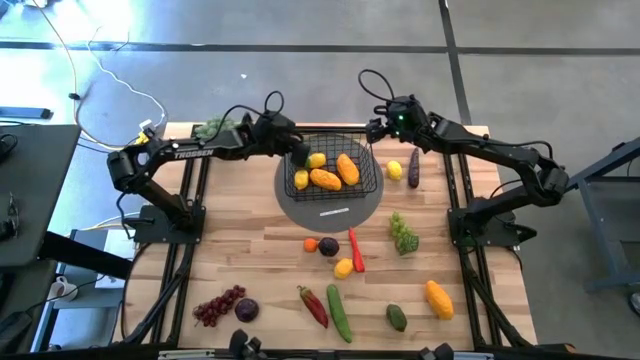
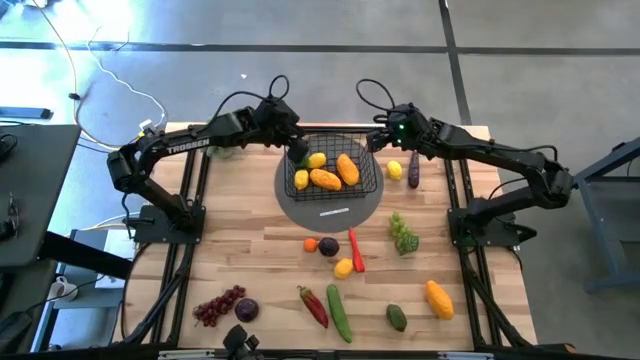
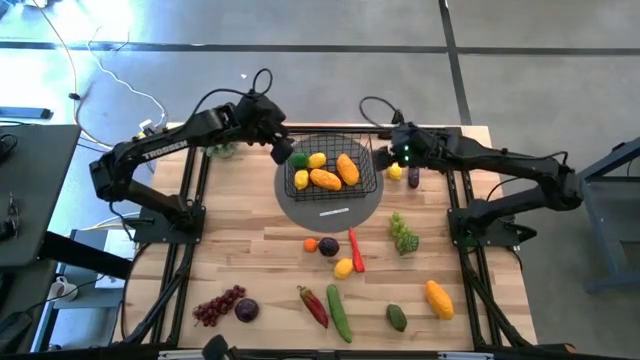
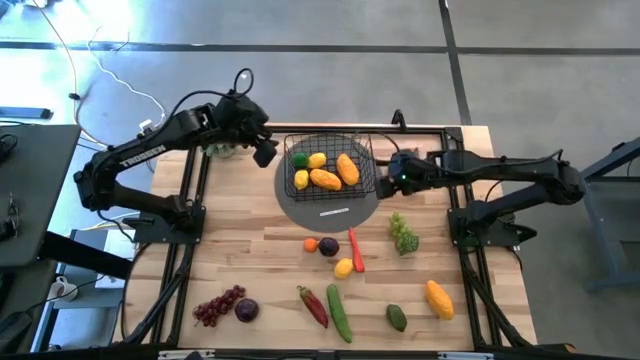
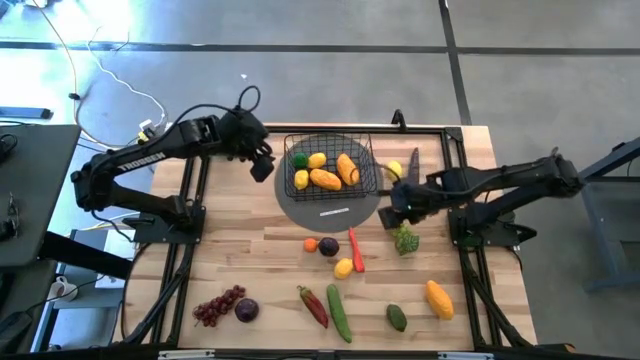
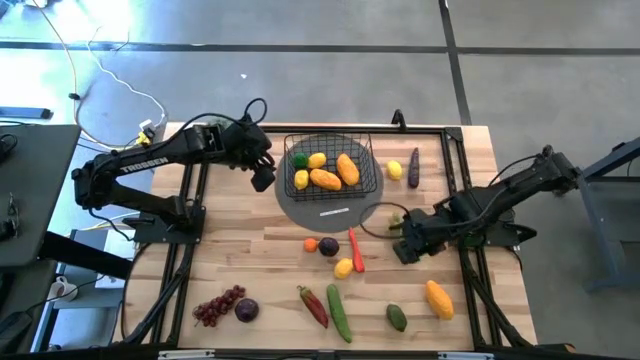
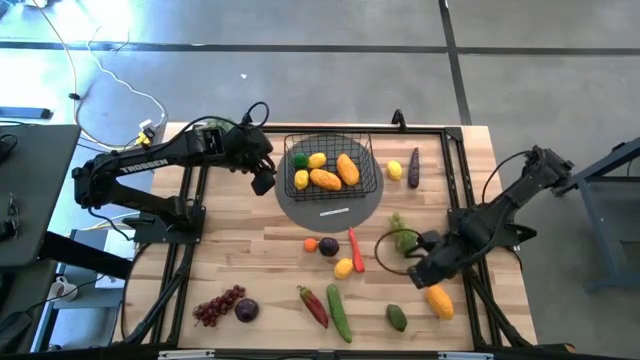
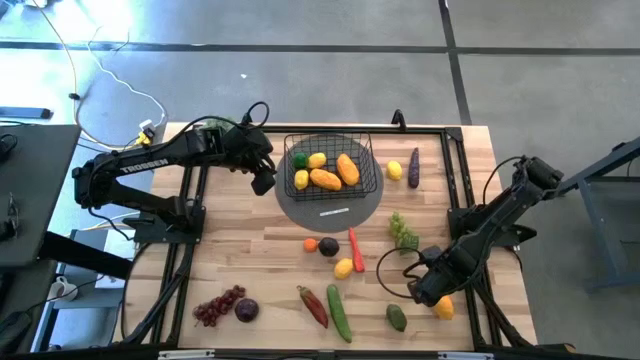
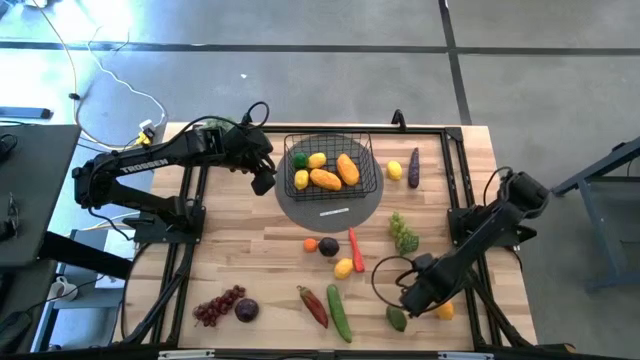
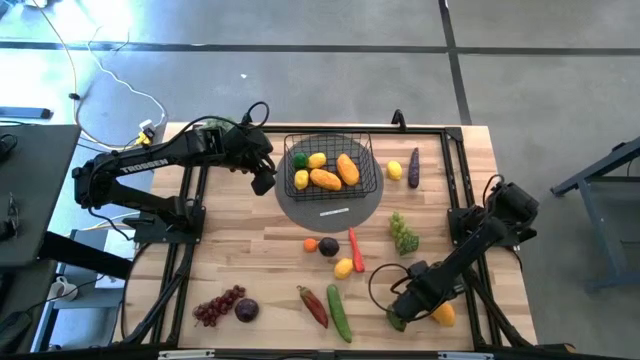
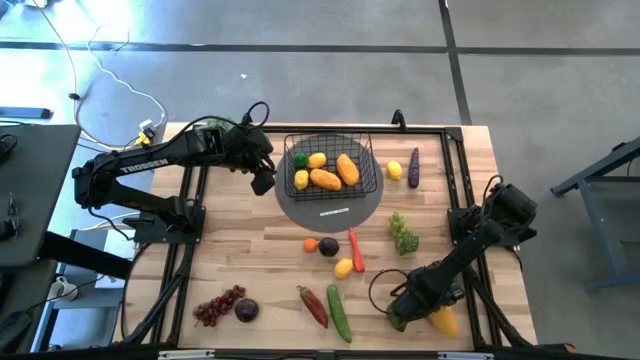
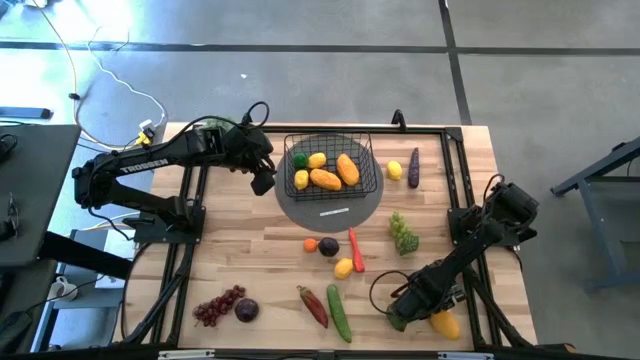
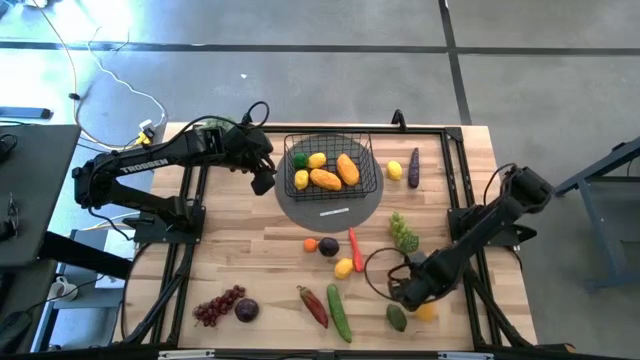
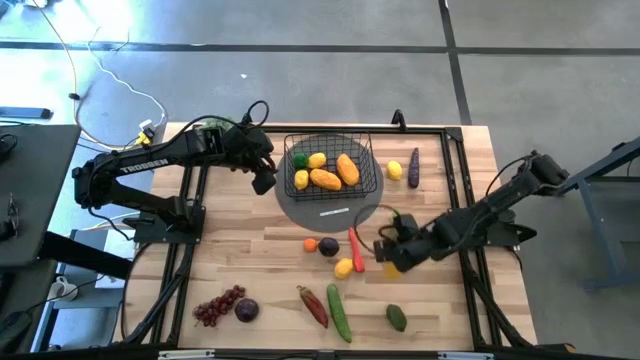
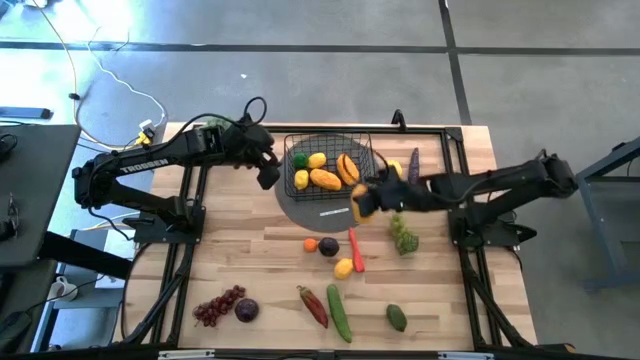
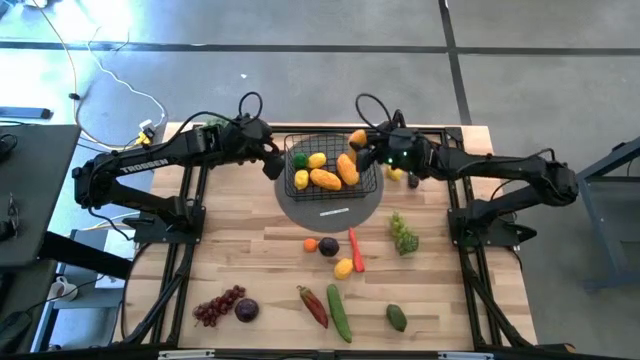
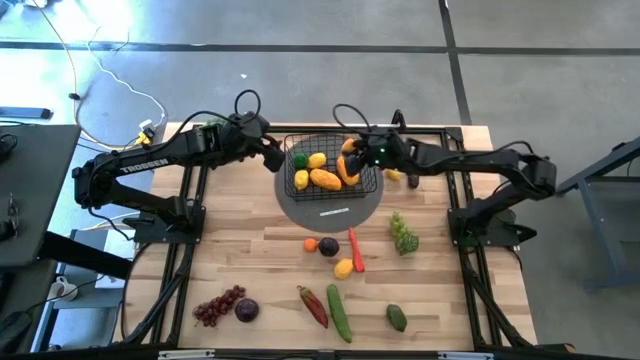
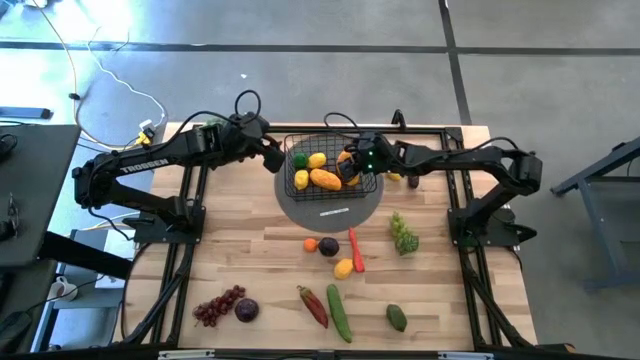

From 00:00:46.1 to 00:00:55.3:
Task: Build produce basket
Put the mango into the black wire basket

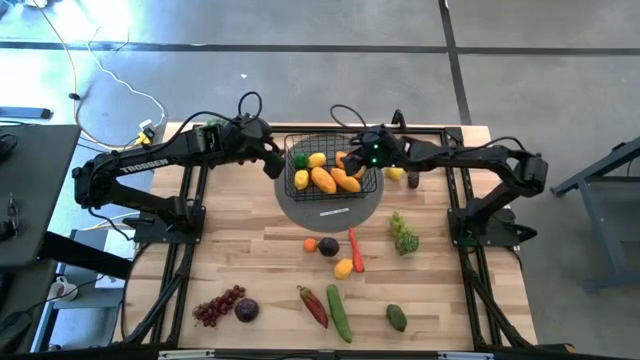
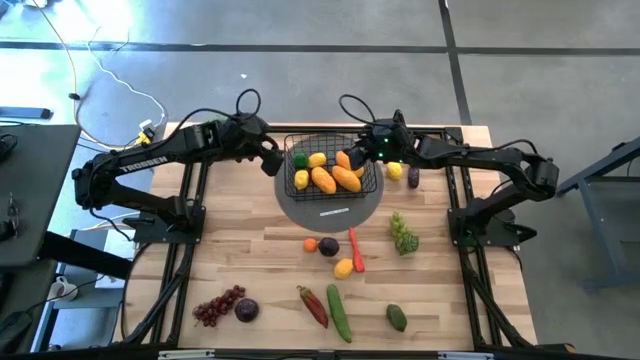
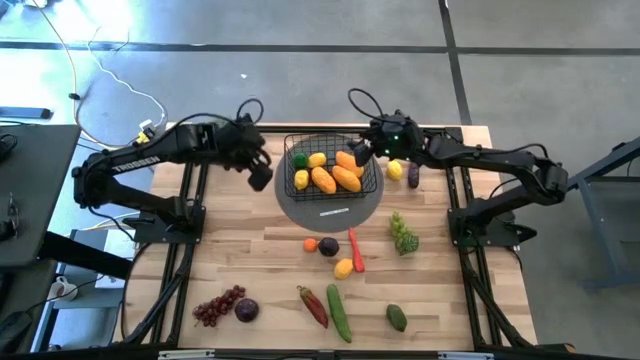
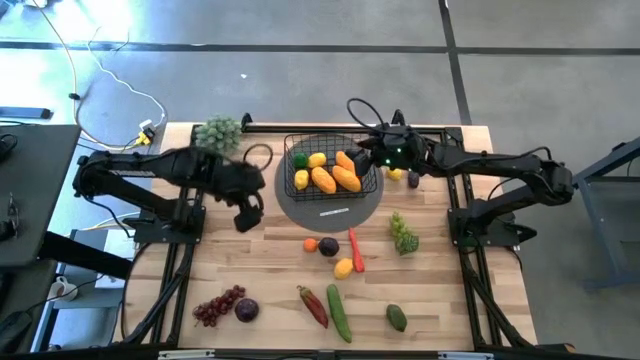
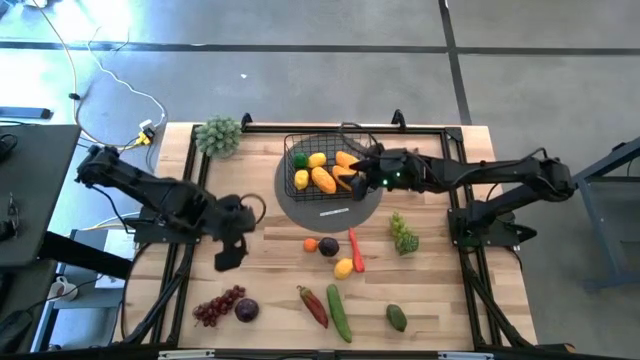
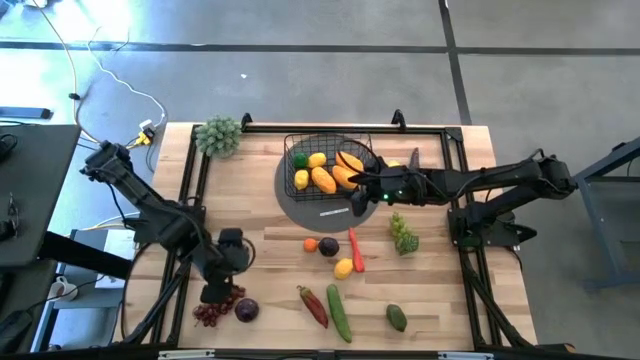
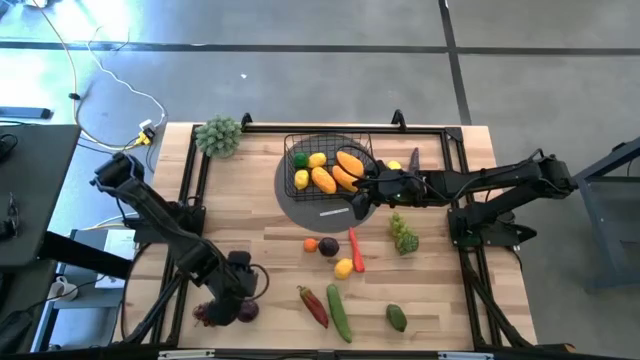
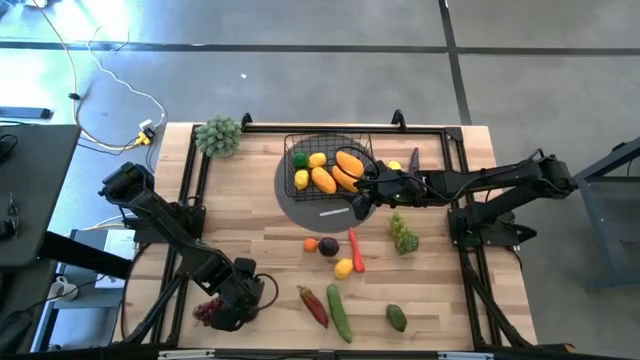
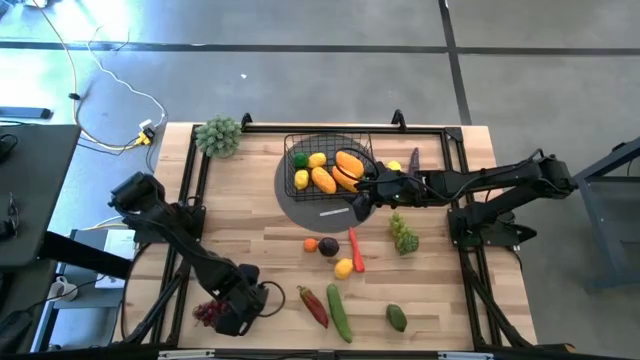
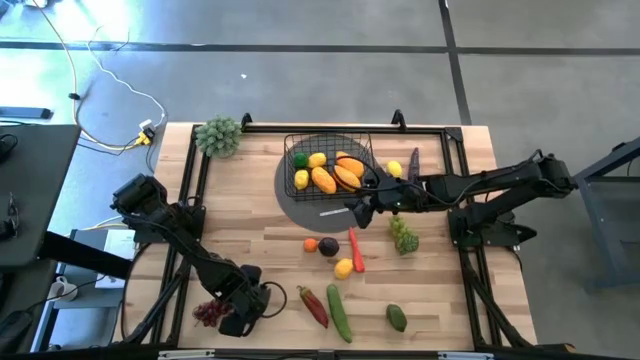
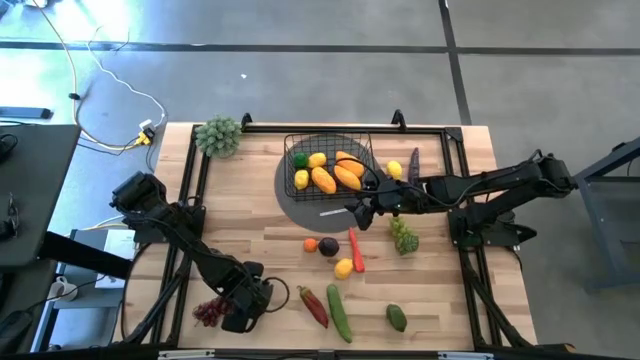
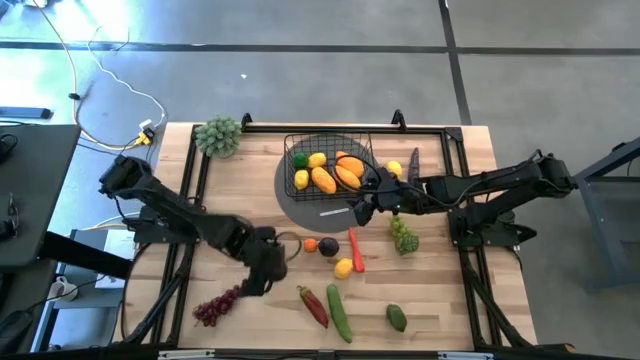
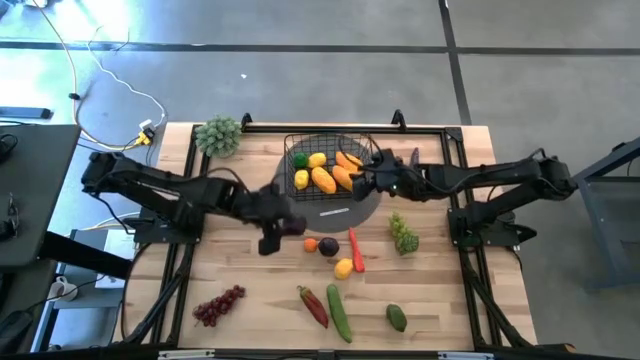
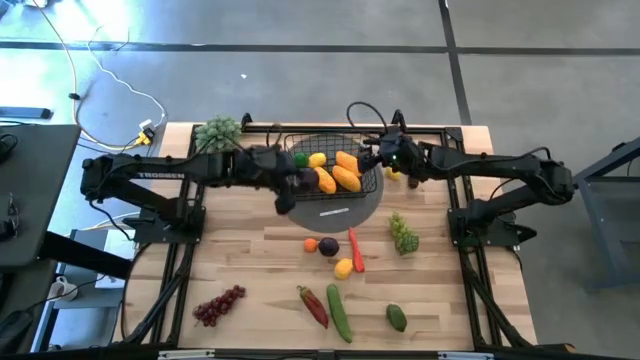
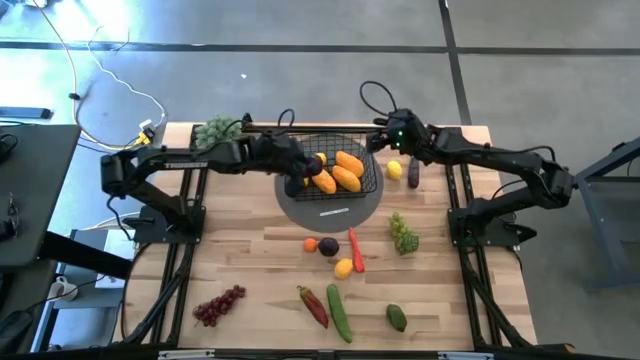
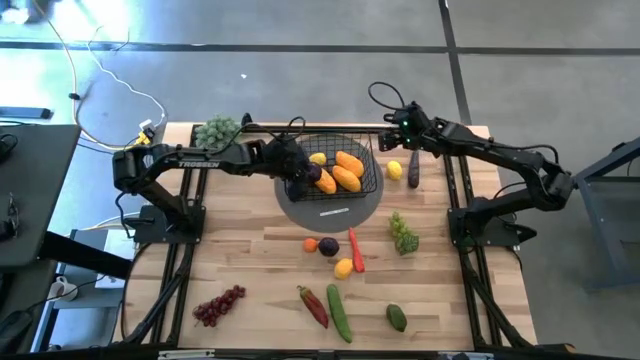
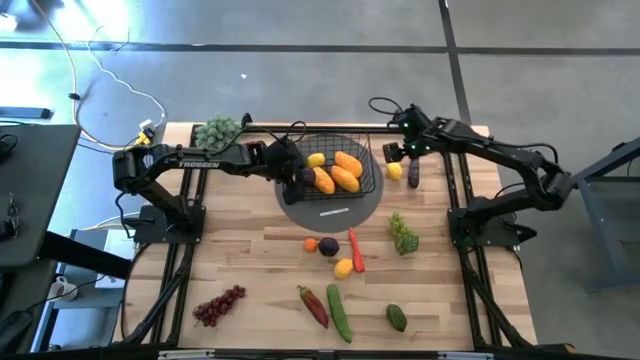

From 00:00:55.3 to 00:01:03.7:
Put the plum into the black wire basket

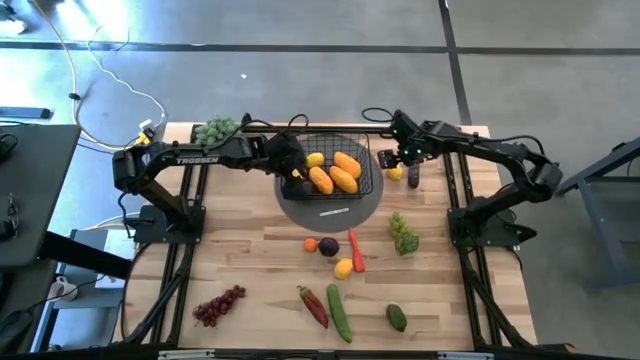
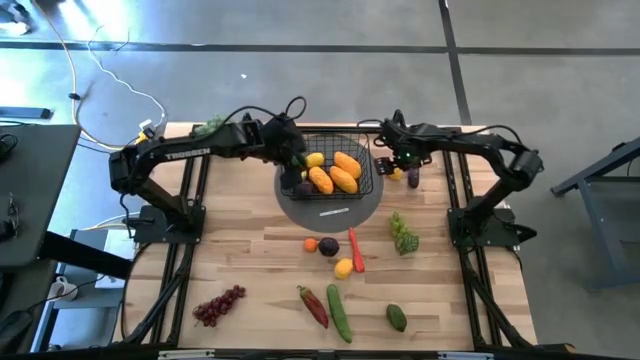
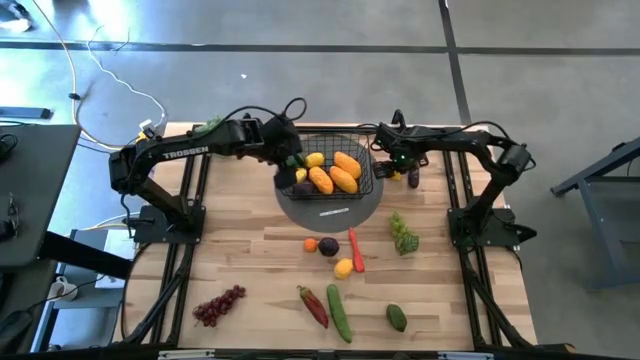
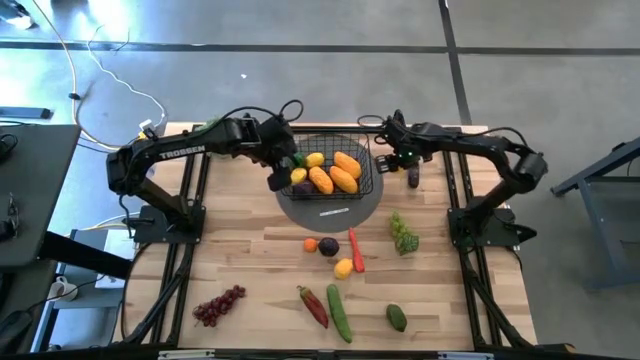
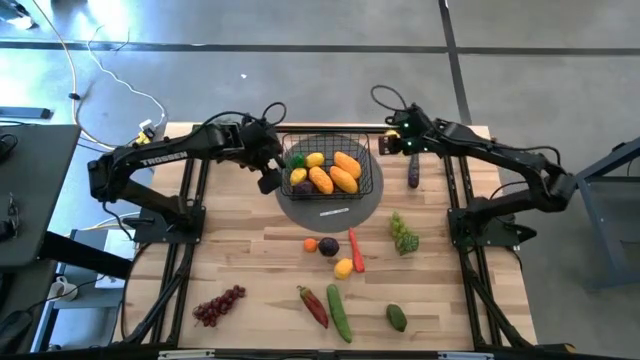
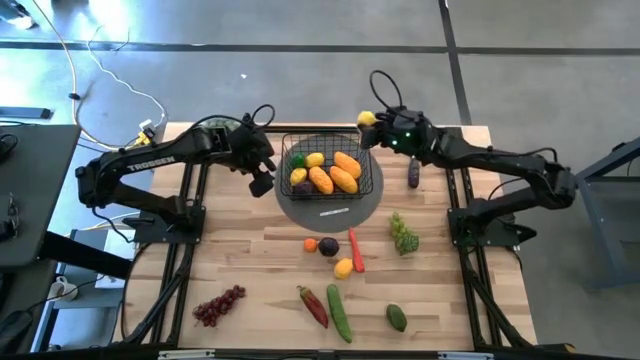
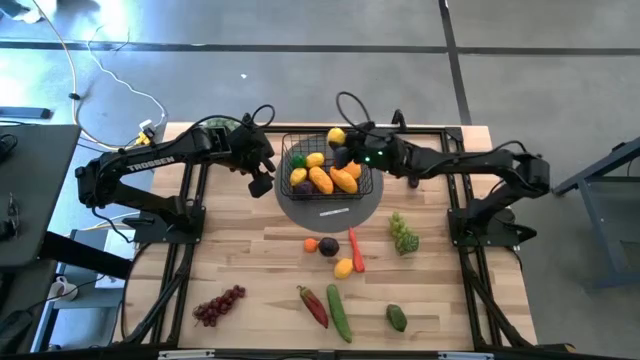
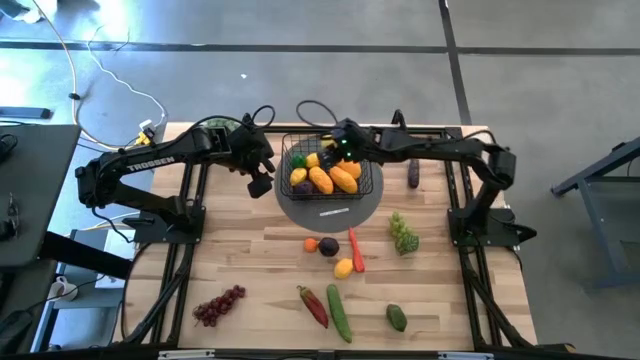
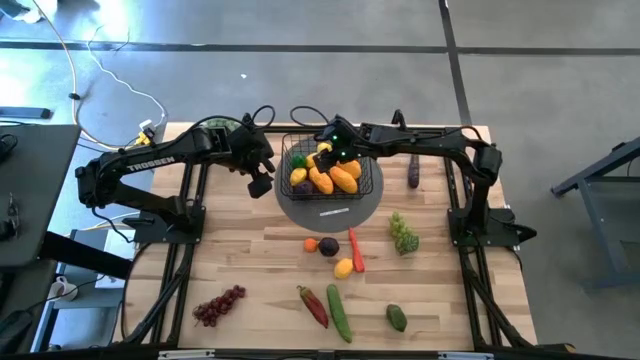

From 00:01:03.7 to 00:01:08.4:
Put the lemon into the black wire basket

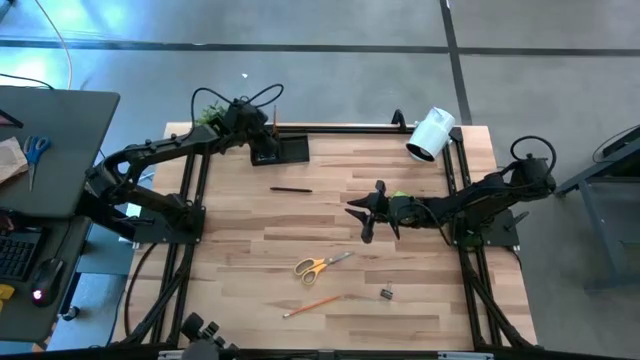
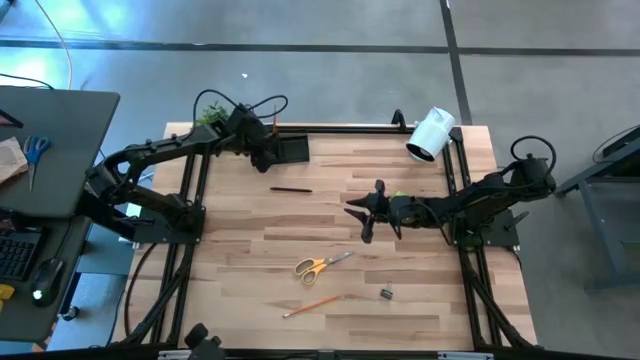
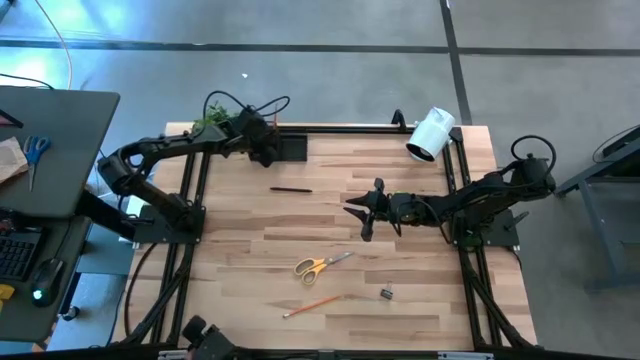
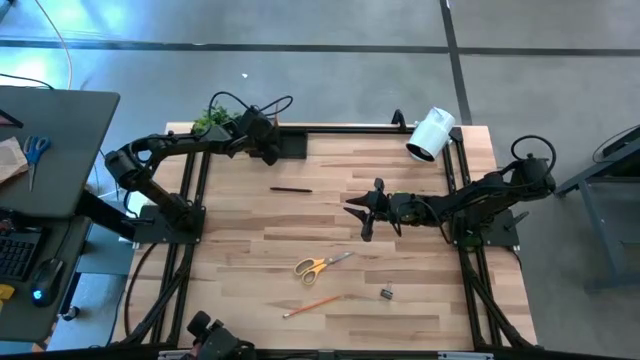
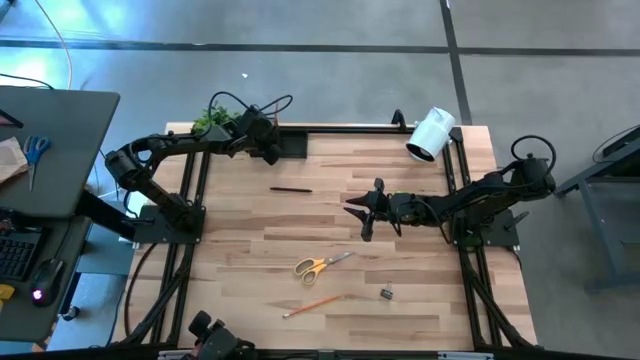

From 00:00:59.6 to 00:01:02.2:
Task: Pick and place office supplies into organizer
Adjust the desk organizer
